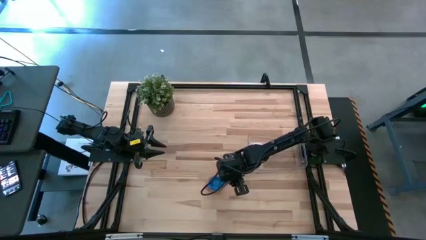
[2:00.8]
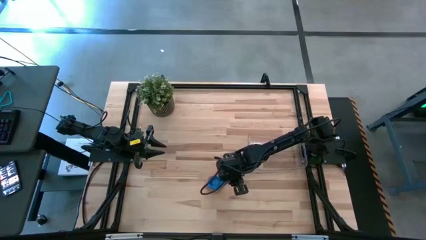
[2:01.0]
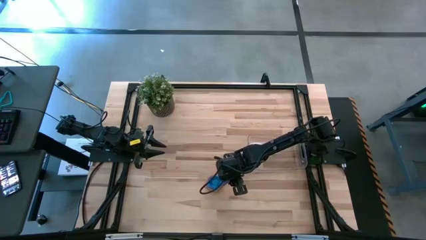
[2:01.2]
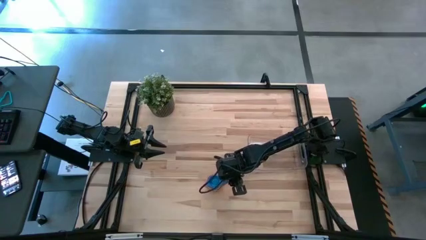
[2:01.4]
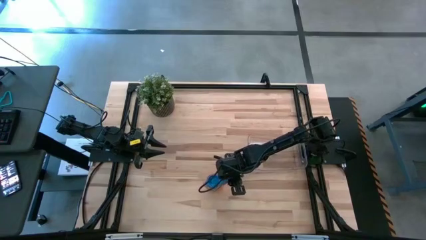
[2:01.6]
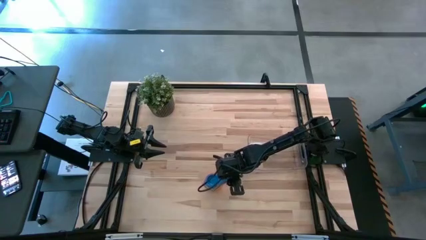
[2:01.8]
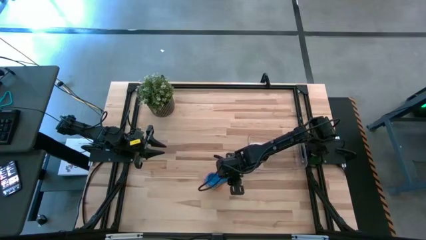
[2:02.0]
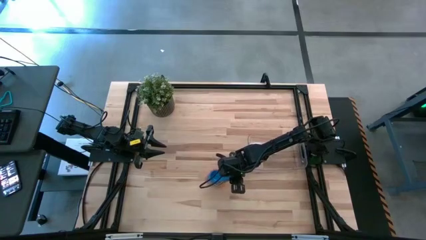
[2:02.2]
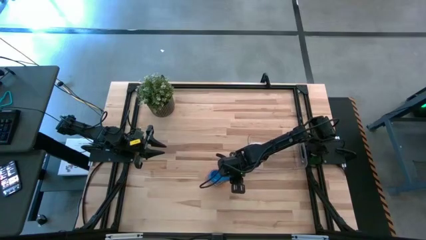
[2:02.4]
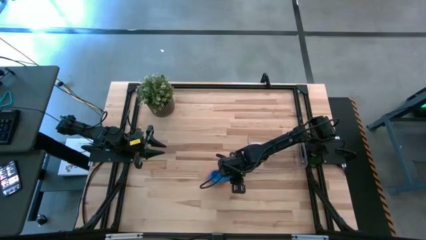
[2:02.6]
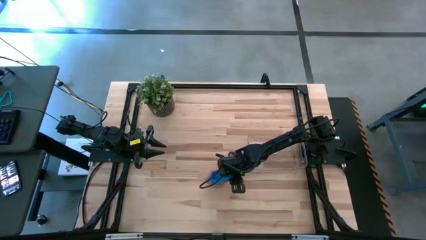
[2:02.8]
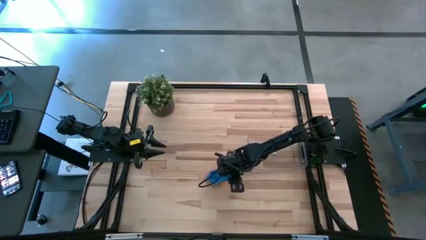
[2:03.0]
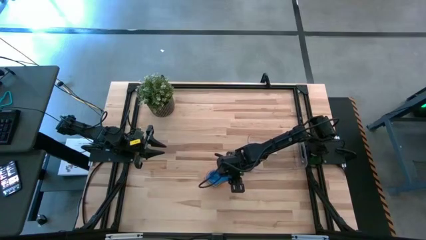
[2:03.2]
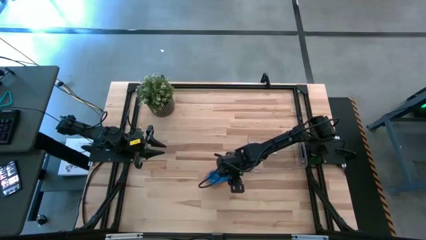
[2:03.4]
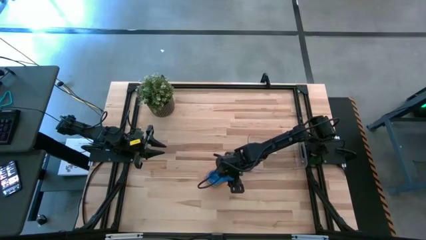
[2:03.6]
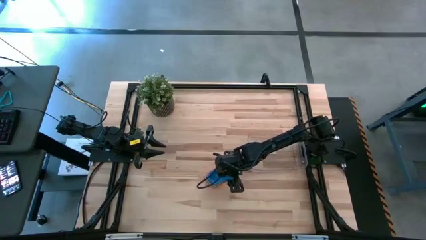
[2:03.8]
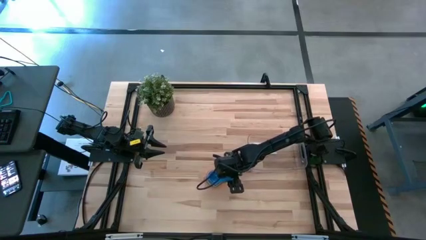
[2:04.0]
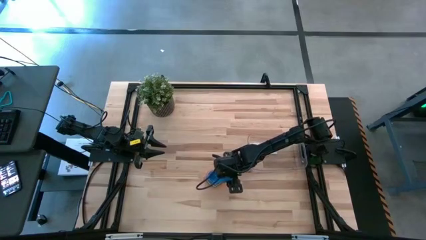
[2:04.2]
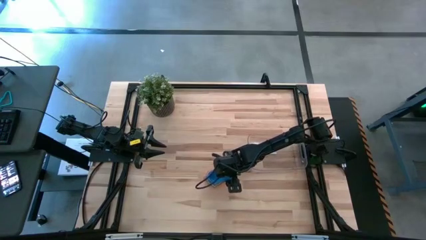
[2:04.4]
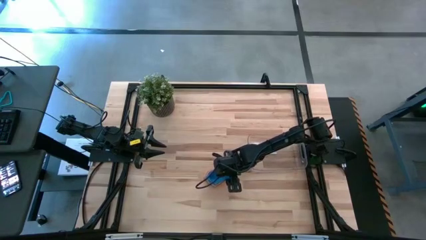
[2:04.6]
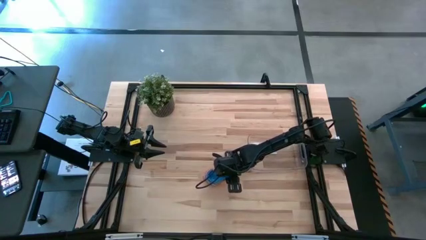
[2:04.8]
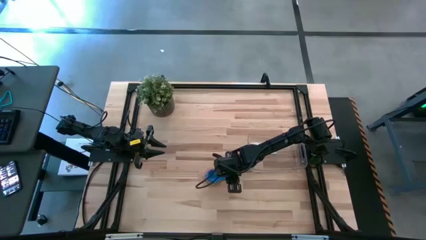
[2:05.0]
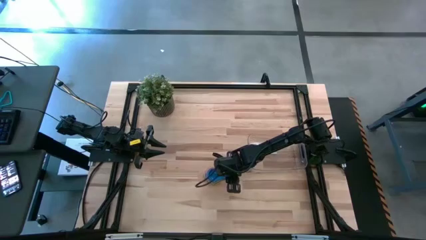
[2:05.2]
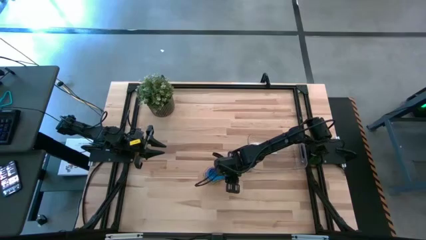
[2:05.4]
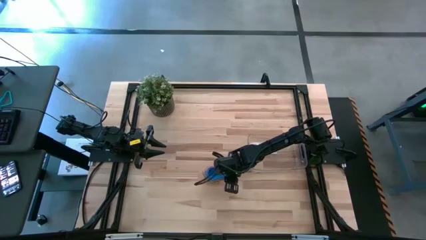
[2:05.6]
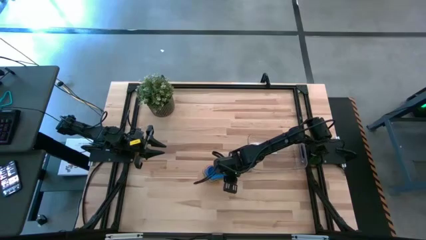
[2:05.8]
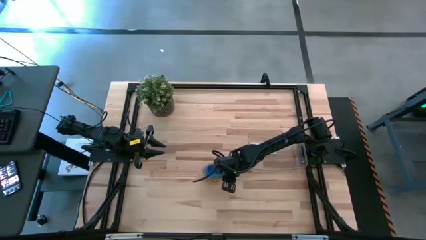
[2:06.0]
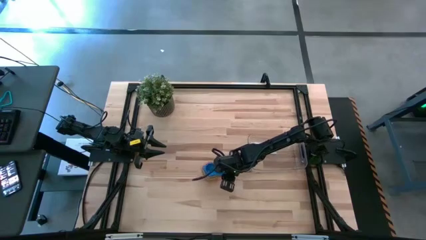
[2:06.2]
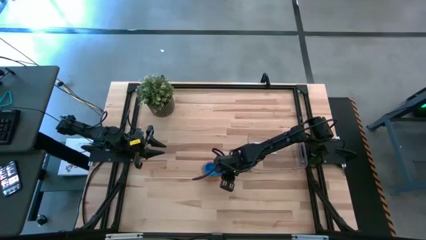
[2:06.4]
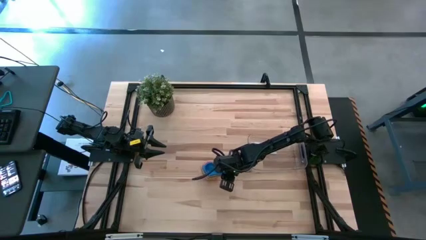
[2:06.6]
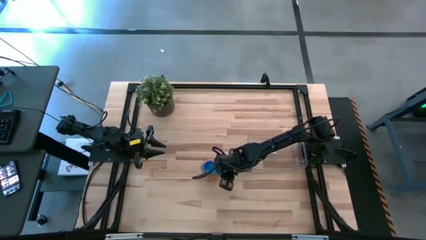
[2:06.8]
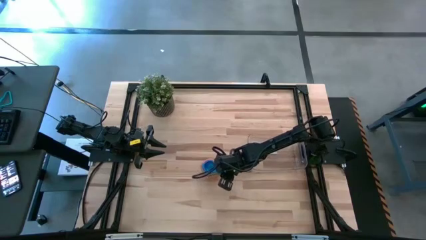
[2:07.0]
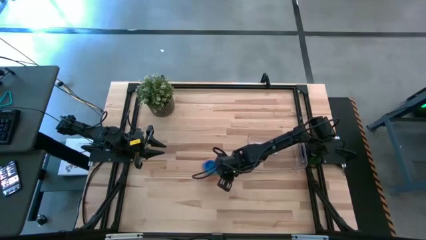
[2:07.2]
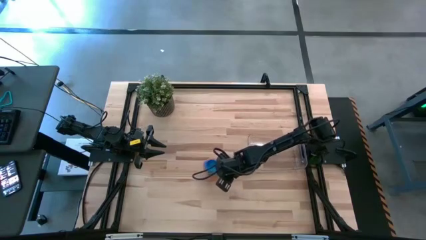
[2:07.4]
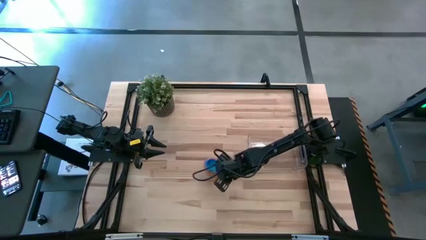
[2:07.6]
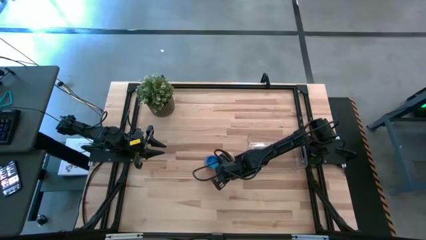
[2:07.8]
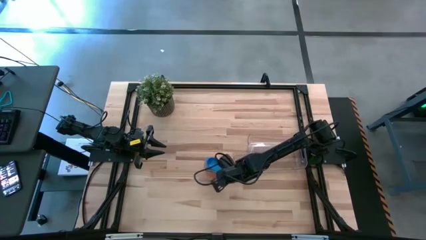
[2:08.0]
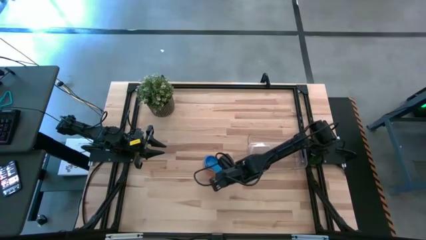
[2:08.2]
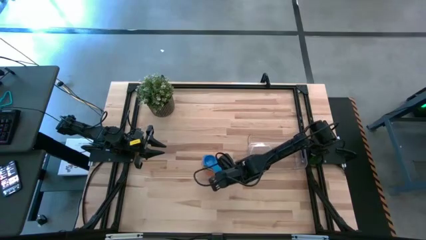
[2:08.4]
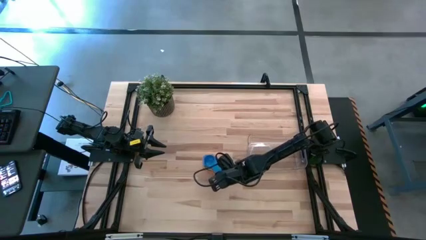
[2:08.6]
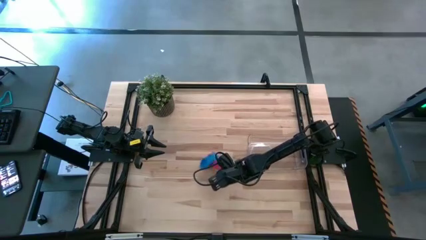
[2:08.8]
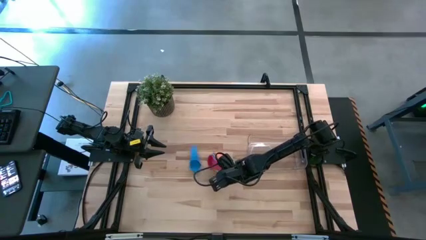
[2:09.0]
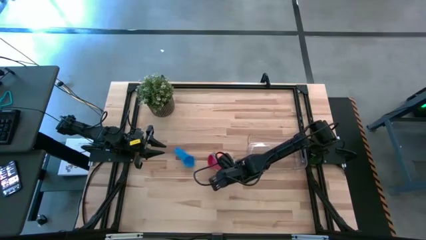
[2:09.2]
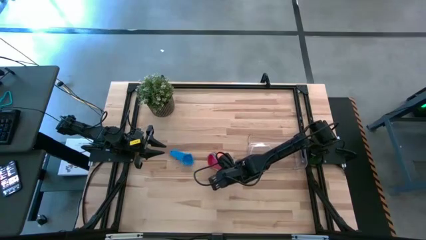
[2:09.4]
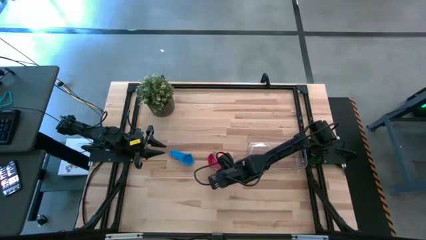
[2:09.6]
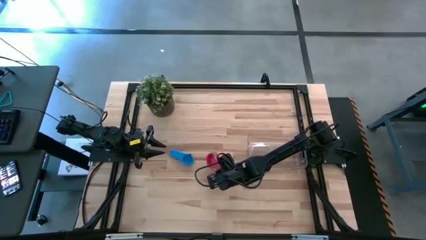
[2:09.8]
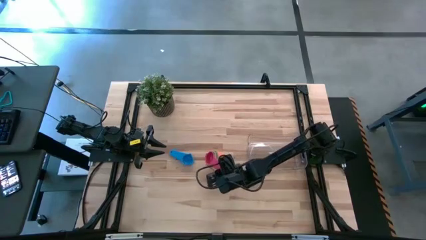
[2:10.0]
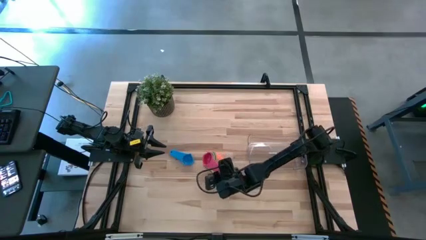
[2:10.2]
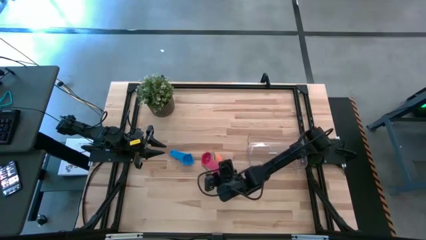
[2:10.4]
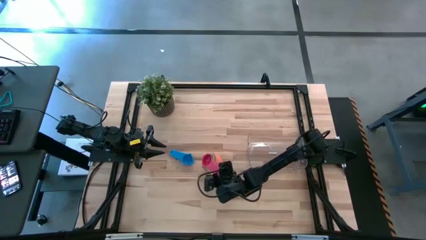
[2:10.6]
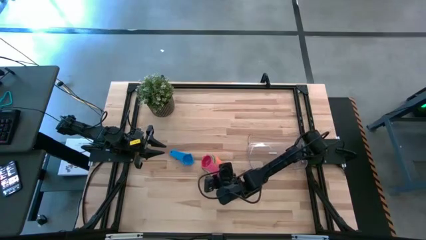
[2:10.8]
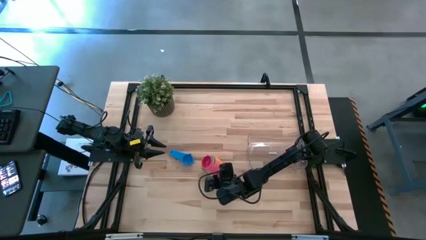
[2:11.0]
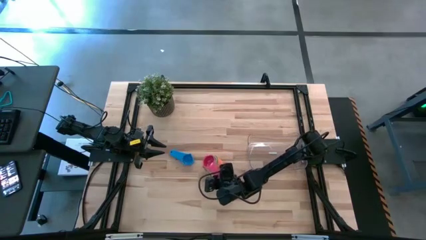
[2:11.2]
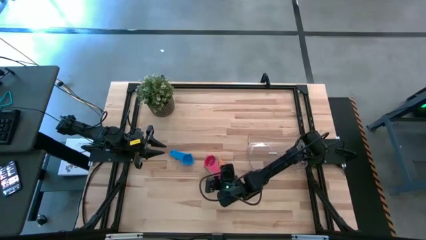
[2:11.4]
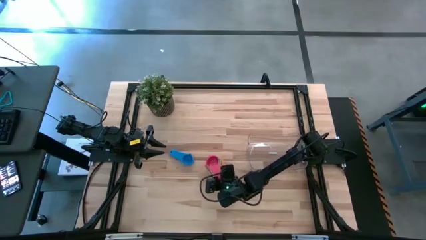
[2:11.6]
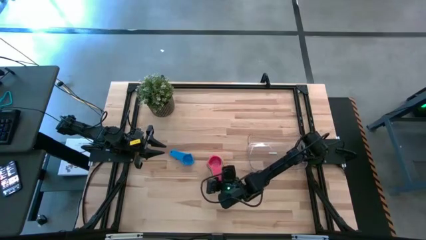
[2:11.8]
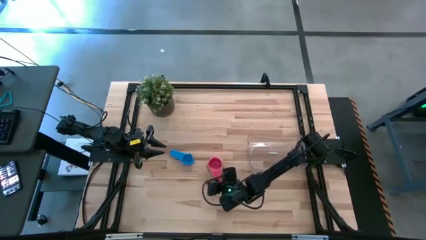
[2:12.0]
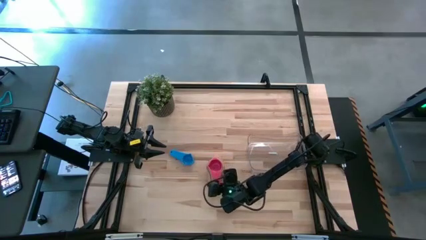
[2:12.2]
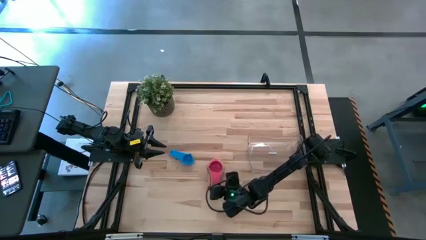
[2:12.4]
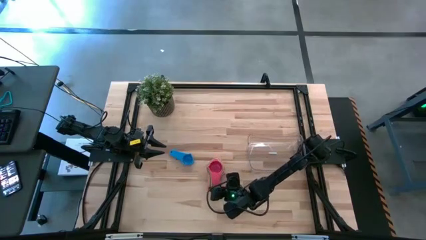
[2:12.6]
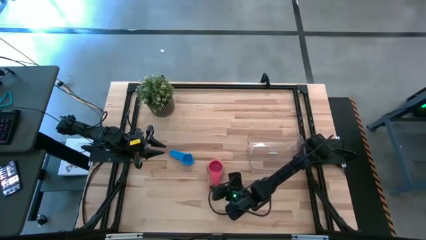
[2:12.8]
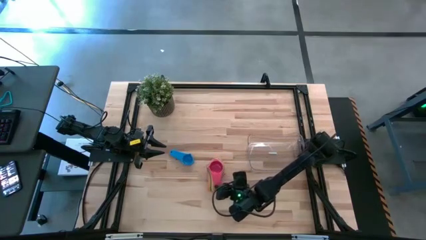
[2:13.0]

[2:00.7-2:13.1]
Task: Nest measuring cups in basket
Put the stacked measuring cups into the transparent bin

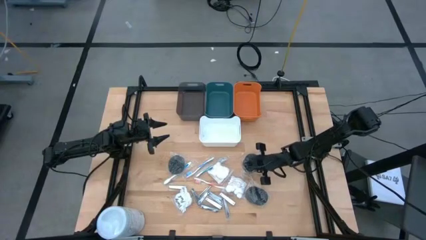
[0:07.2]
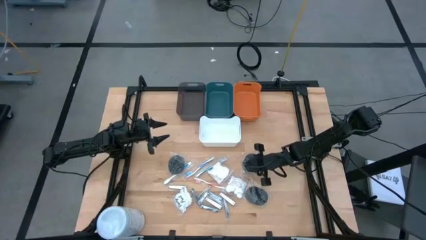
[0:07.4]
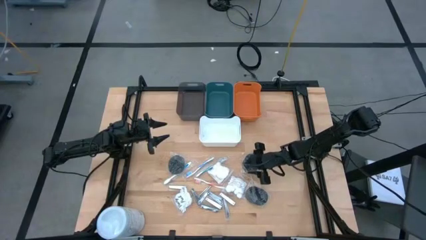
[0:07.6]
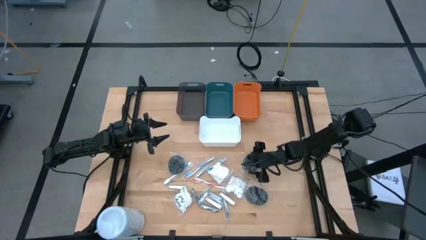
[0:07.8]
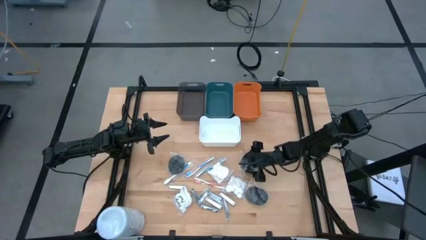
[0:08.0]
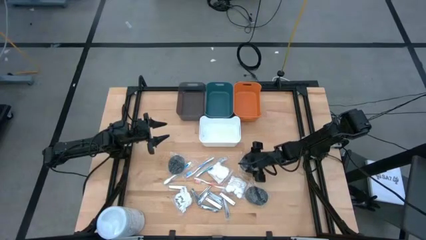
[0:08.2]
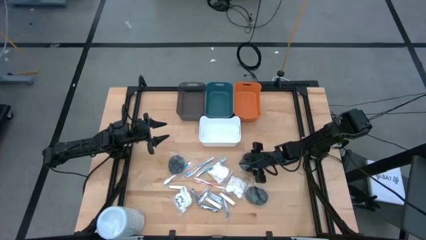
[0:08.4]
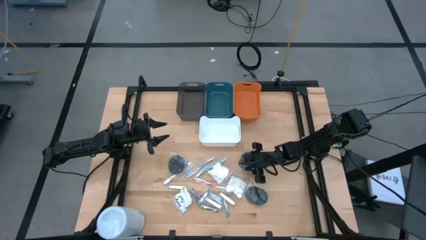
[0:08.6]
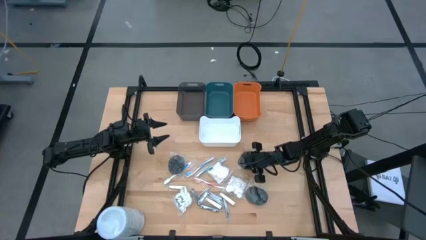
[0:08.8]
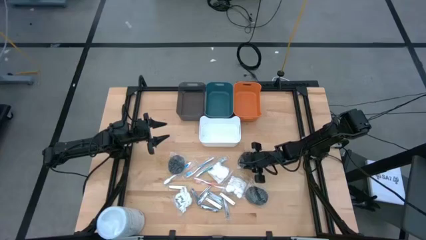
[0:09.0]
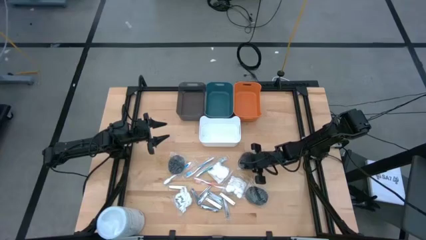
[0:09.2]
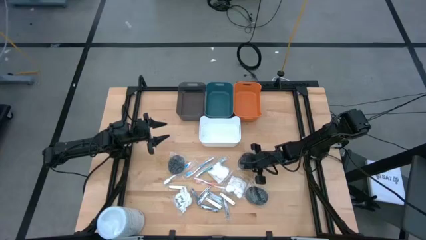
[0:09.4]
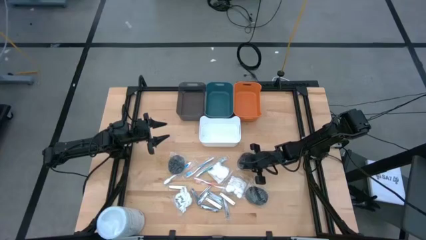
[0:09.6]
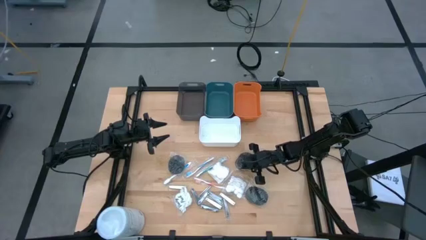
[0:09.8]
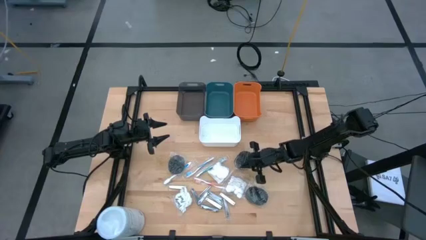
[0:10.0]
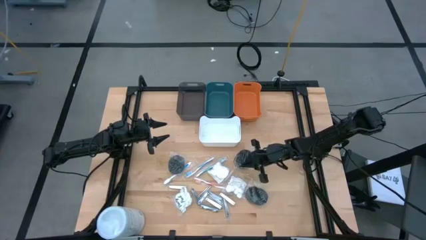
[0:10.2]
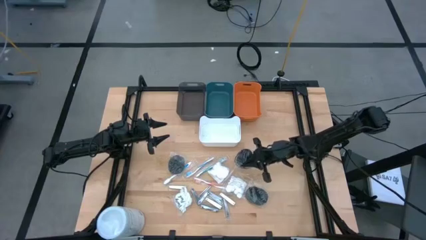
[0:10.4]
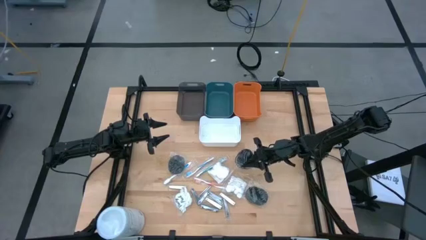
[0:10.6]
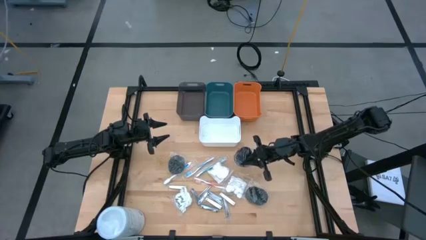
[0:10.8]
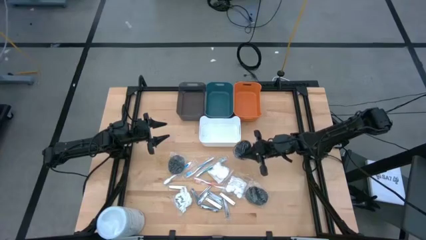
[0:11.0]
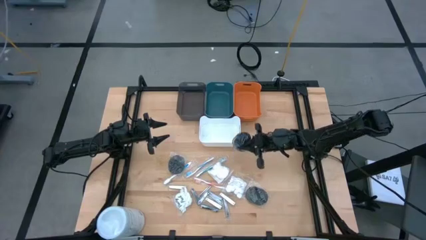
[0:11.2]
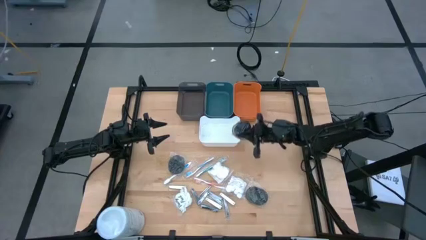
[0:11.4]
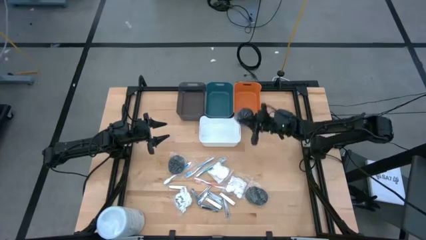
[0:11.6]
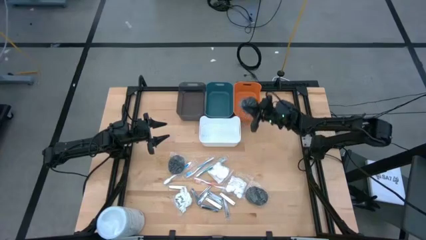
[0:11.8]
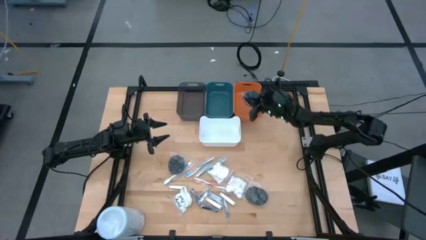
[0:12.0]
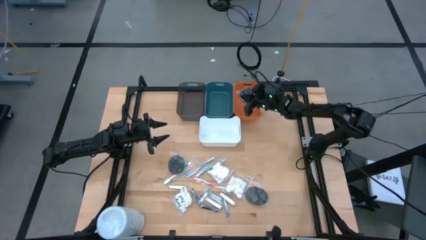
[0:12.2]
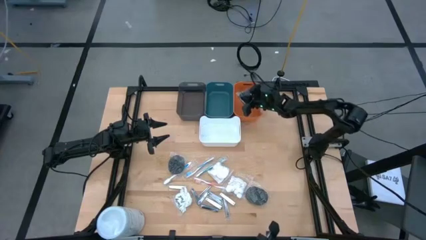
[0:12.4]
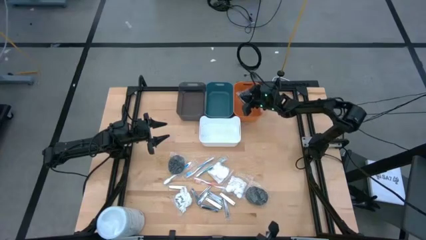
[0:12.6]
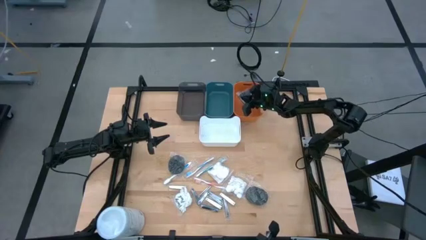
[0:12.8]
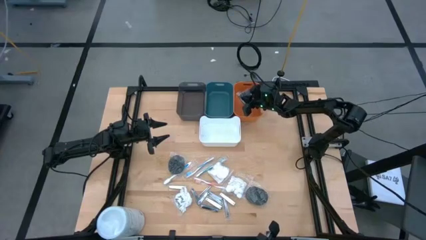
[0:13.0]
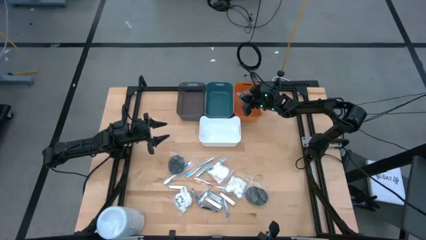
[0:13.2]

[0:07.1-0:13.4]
Task: Pick & Place Travel size toiletries
Put the black hairbrush into the orange bin
